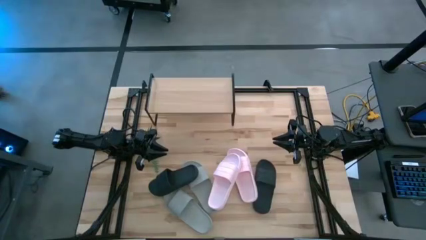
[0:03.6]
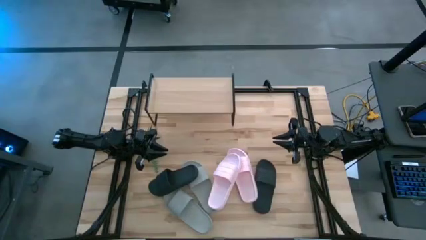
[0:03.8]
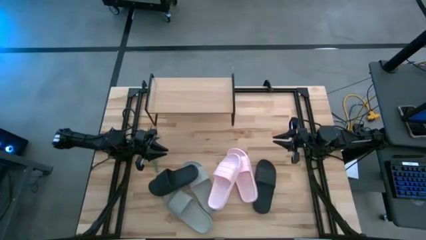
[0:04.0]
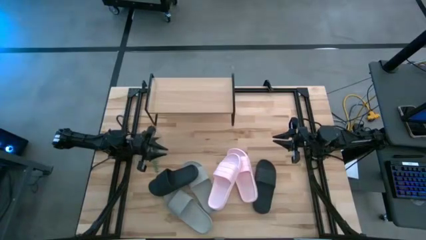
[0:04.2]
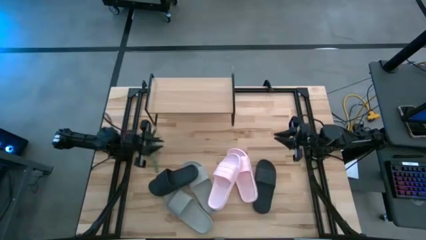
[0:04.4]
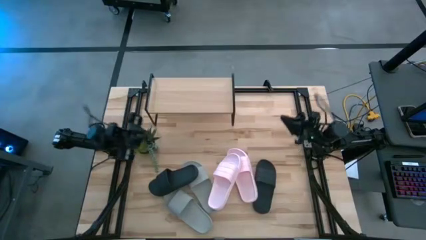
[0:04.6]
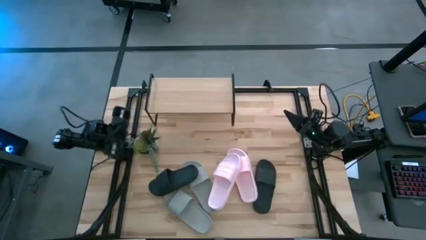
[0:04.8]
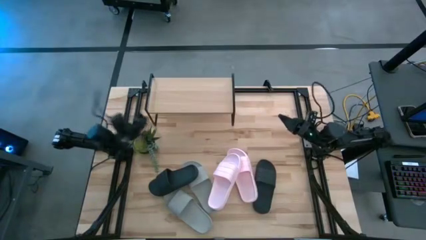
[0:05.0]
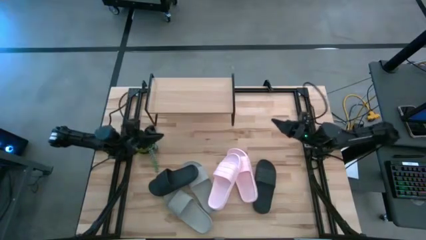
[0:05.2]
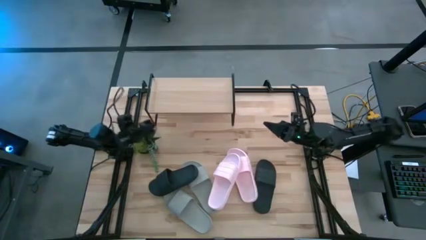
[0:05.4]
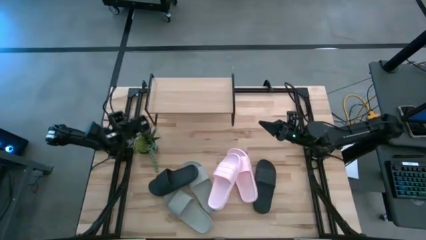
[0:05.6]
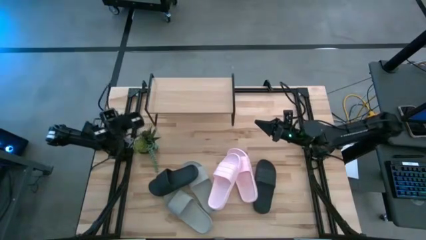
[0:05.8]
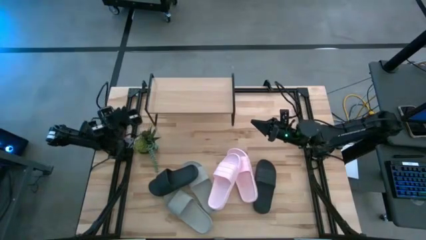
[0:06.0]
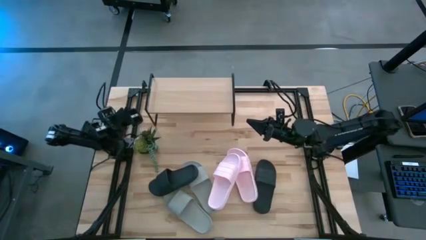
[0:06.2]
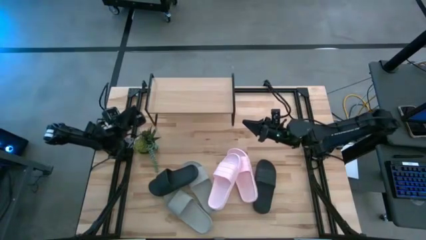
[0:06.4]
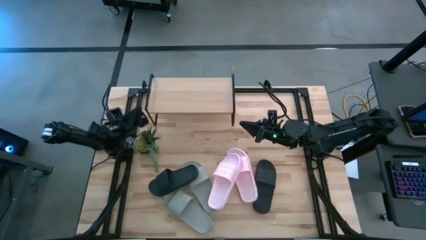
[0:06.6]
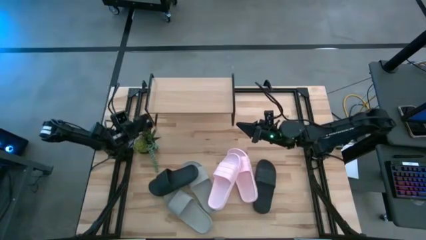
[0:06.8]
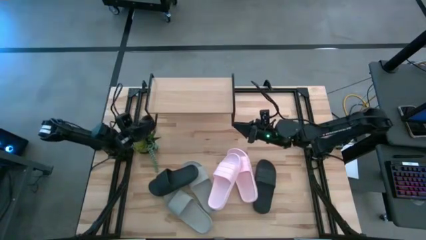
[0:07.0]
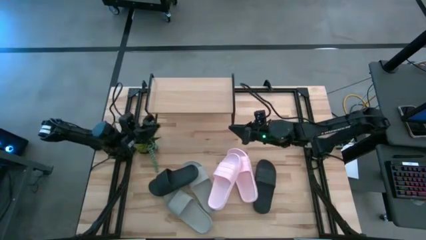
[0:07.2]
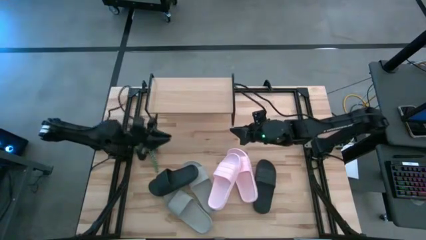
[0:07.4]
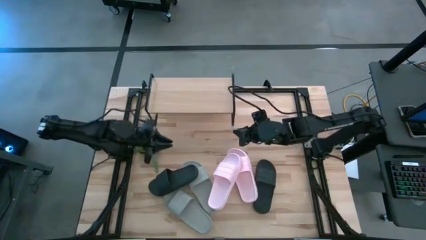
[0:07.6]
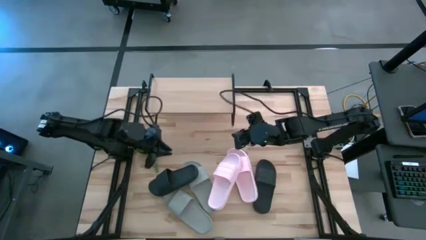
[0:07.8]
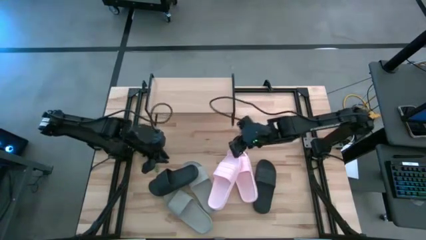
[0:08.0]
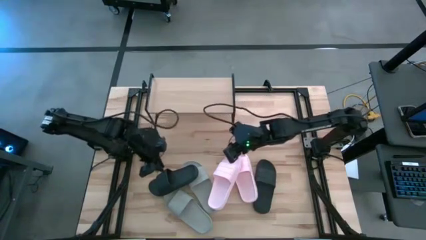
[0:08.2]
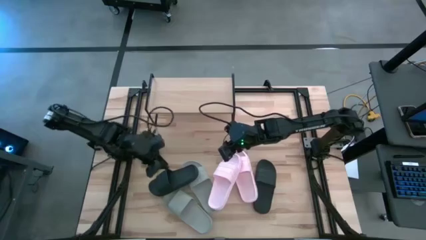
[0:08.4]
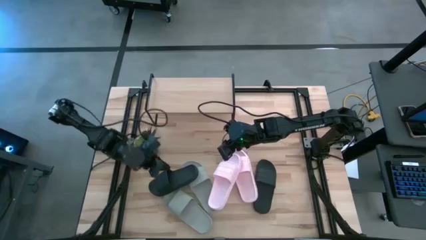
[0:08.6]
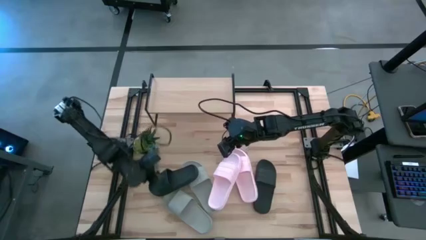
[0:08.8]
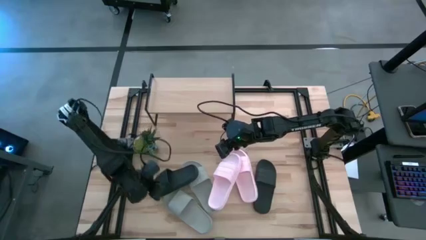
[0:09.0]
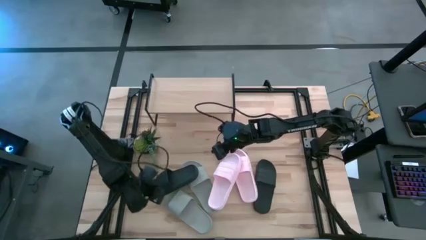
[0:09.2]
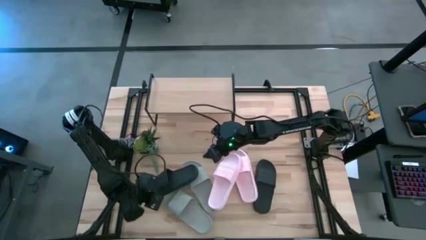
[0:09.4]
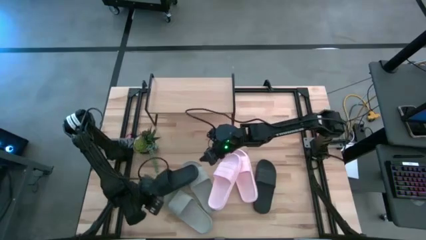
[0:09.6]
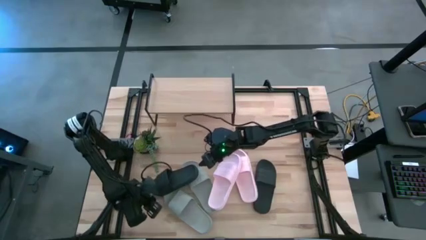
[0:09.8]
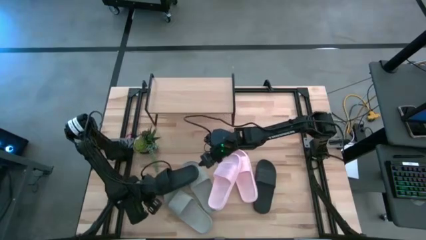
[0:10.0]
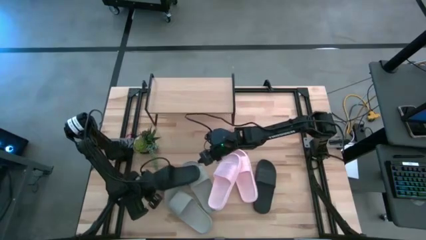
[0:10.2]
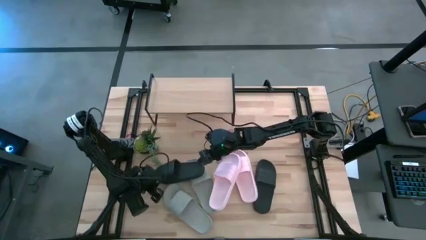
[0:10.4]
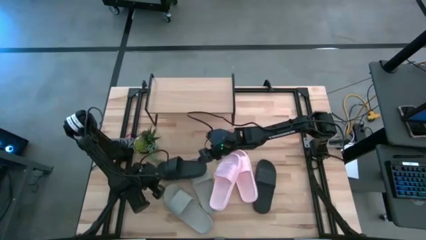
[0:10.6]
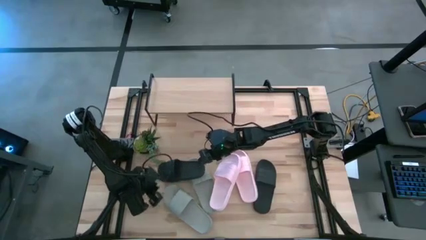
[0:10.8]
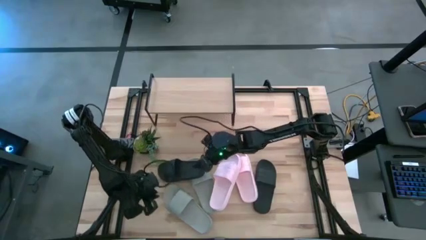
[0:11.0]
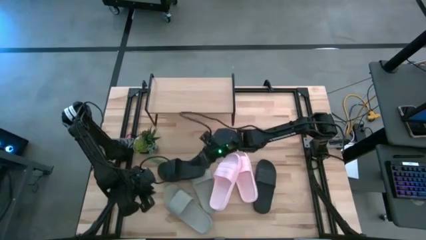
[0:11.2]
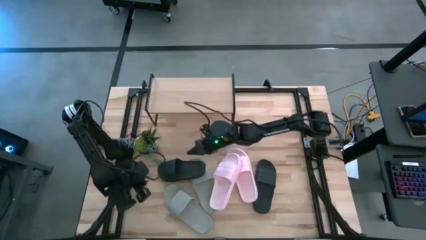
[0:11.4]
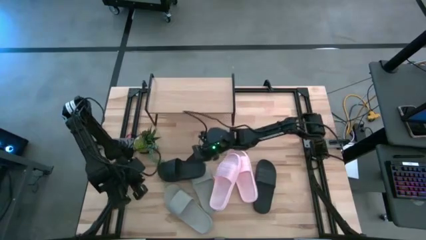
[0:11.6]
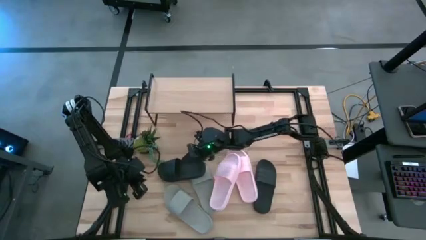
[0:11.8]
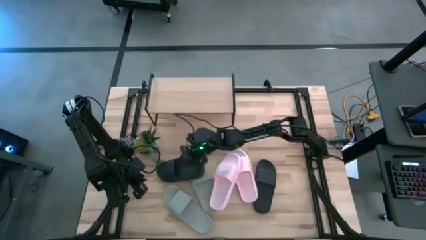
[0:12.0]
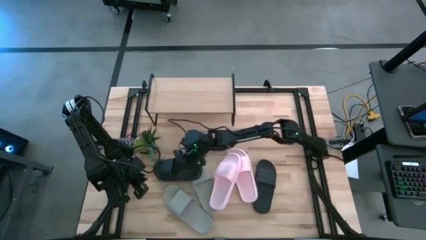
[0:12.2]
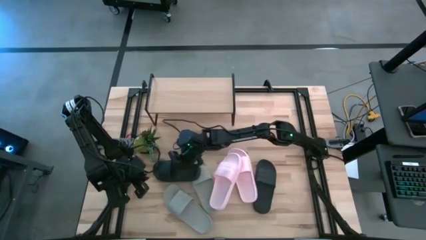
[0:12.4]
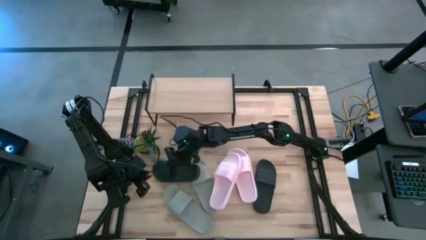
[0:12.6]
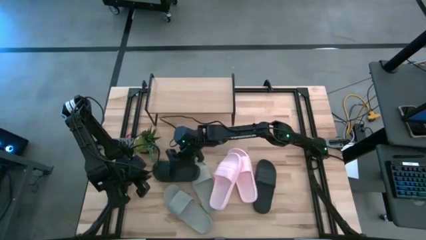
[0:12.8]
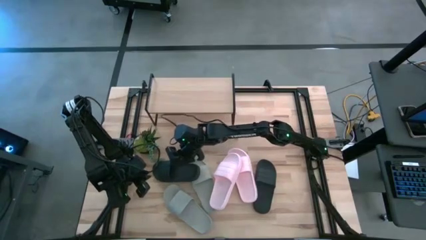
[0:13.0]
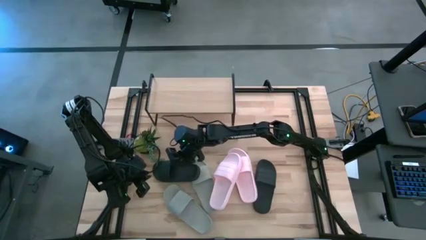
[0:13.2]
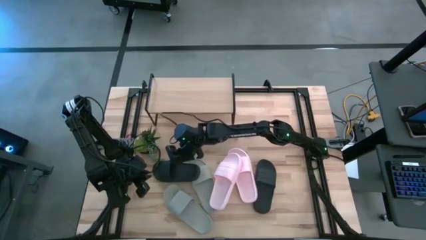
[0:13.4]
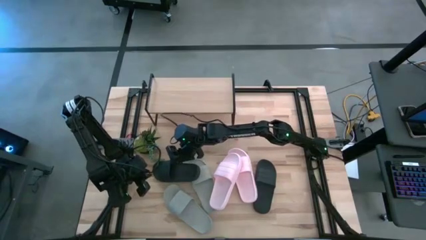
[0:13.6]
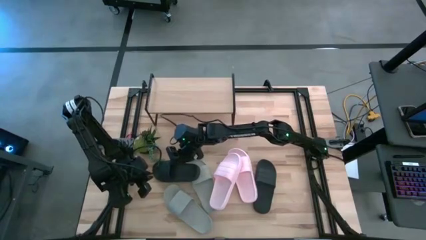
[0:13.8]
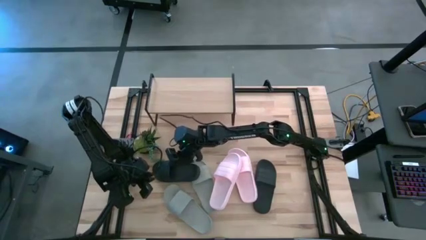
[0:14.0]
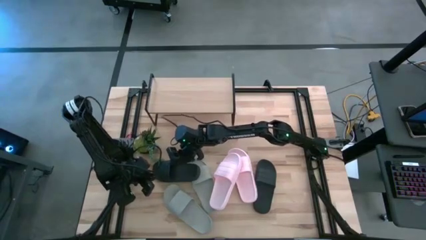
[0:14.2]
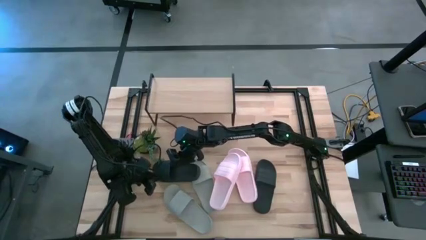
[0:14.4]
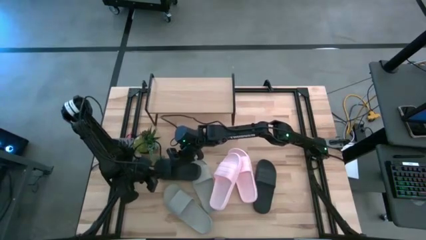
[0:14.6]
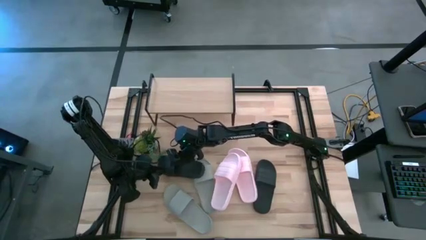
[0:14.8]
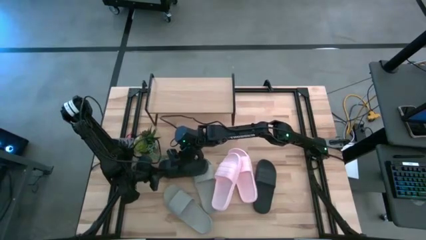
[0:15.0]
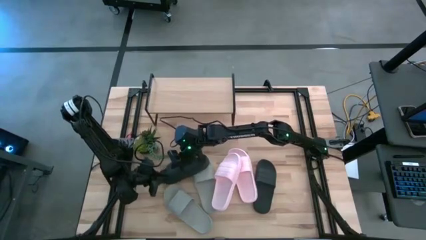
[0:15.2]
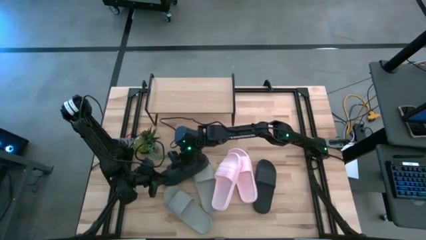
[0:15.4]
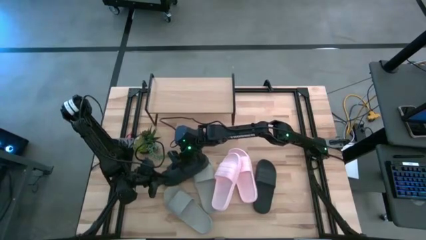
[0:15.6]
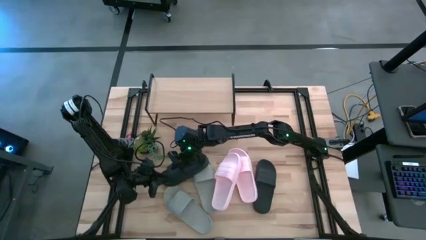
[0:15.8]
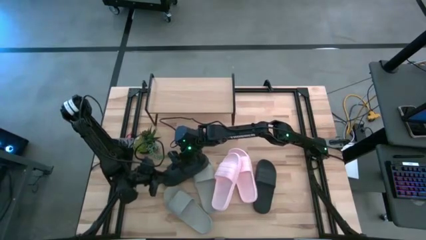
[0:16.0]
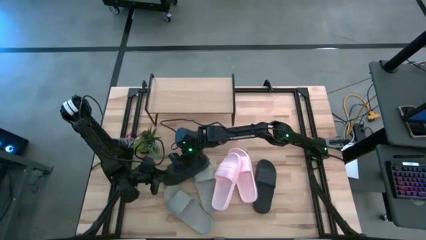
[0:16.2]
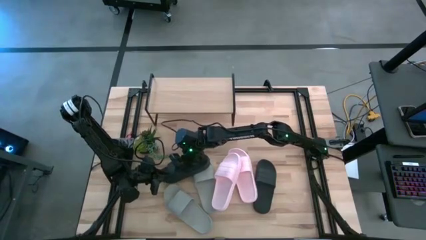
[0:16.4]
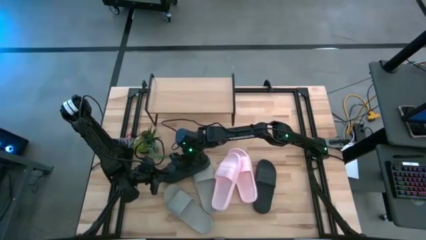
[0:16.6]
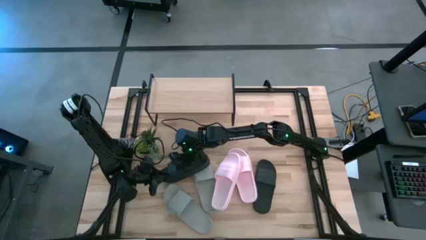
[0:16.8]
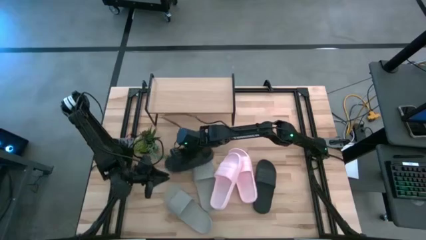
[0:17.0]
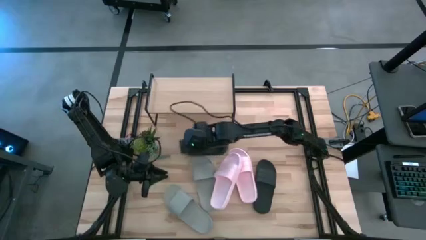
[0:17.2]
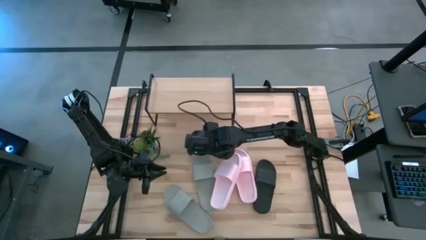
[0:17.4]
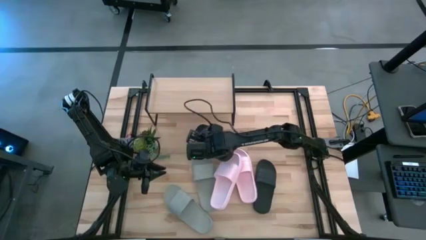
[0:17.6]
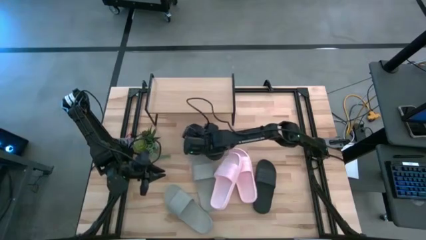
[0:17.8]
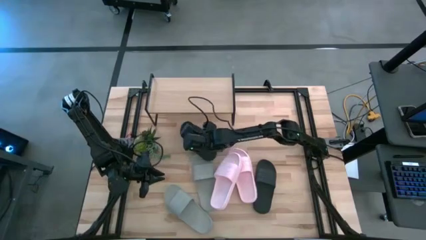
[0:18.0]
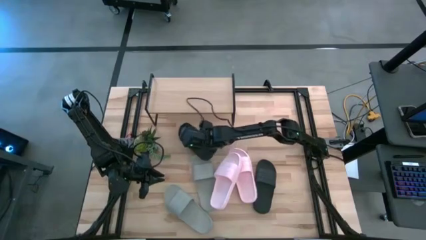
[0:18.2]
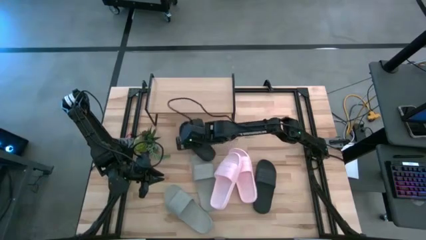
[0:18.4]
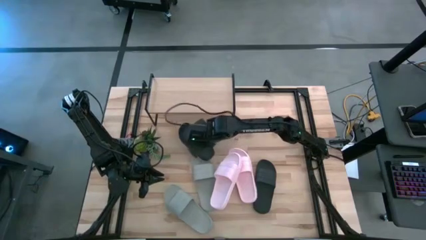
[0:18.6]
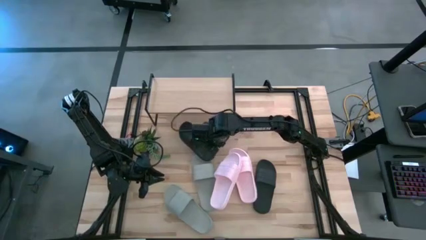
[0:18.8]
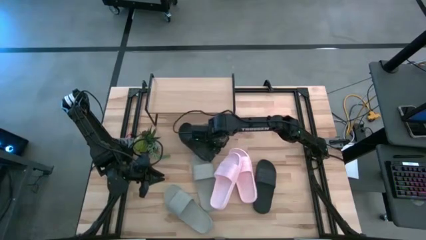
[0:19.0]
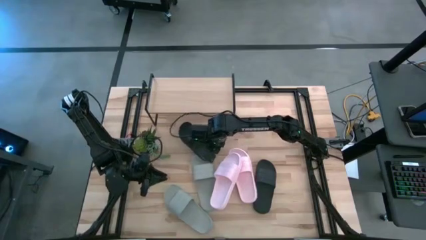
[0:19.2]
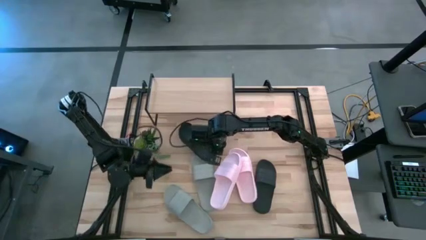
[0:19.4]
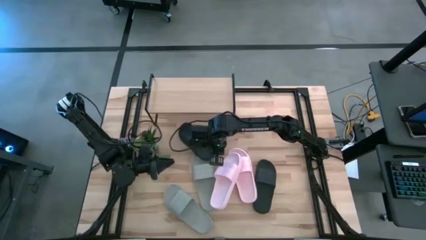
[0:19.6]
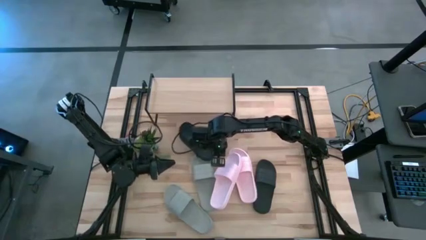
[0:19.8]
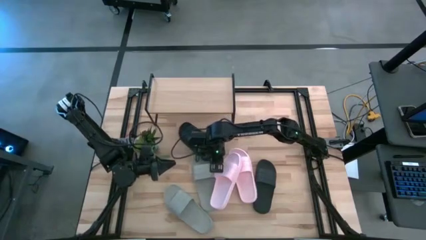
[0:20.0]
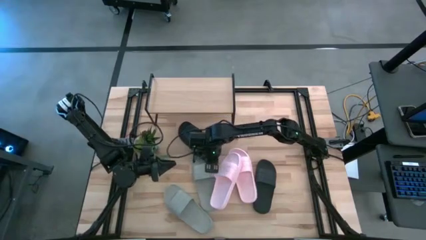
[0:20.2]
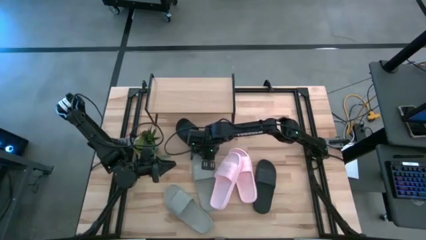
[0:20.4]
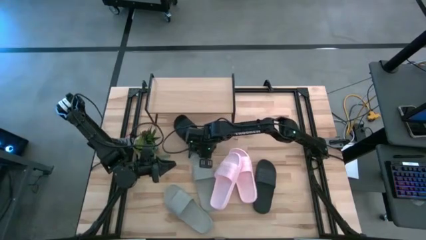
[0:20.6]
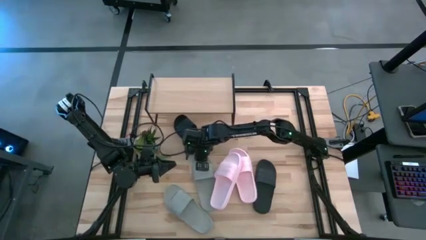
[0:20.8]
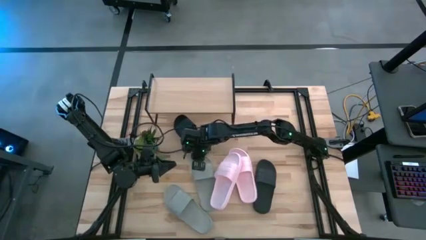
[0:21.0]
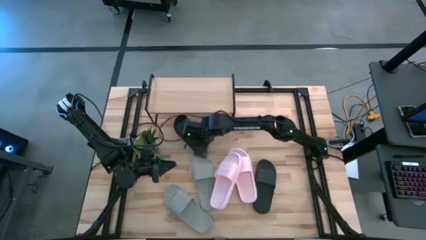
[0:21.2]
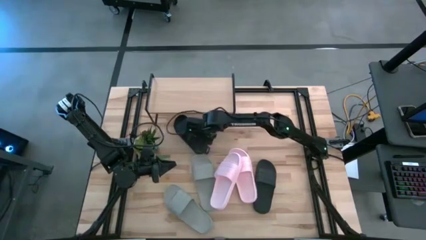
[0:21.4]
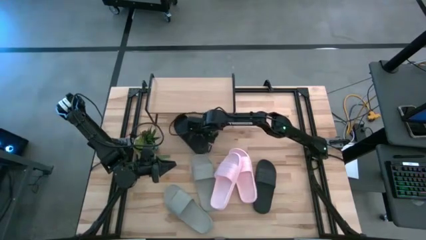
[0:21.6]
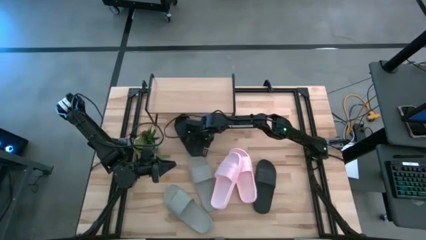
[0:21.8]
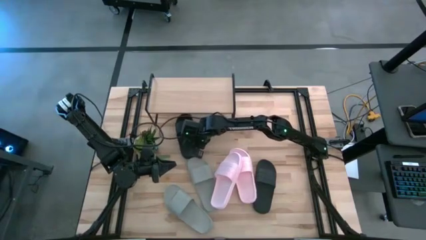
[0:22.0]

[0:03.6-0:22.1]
Task: Pick and place slides into the shelf
Move the left black slider under the shelf
